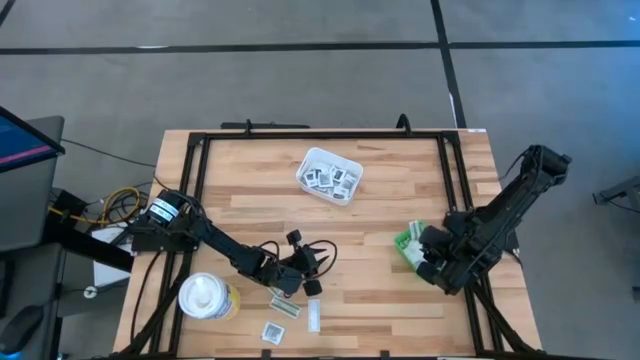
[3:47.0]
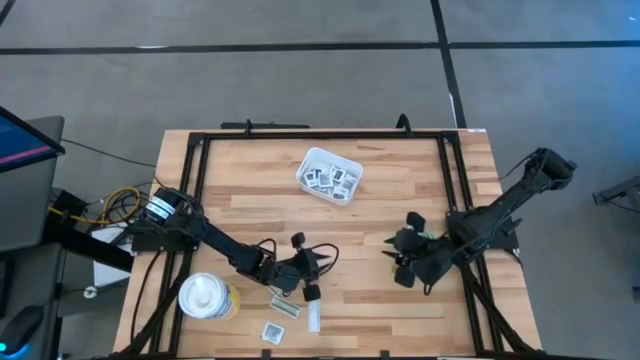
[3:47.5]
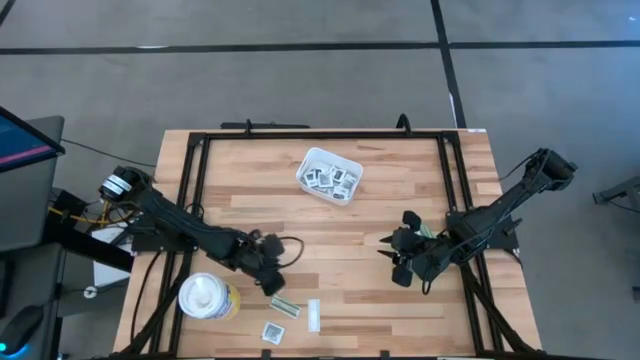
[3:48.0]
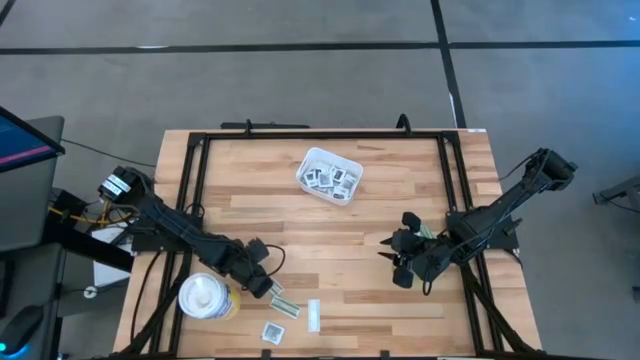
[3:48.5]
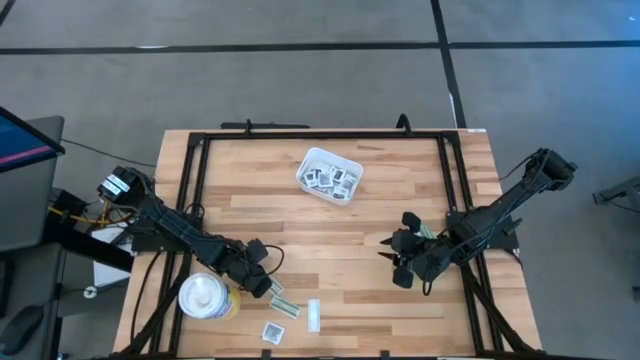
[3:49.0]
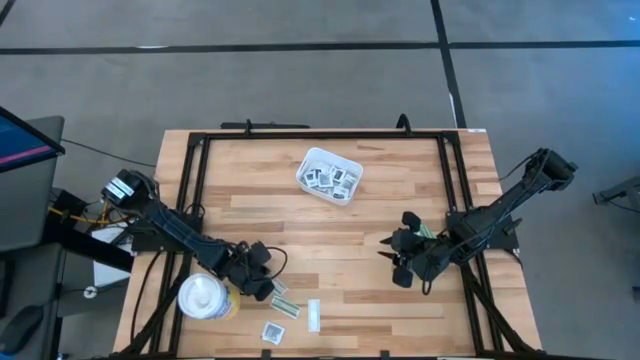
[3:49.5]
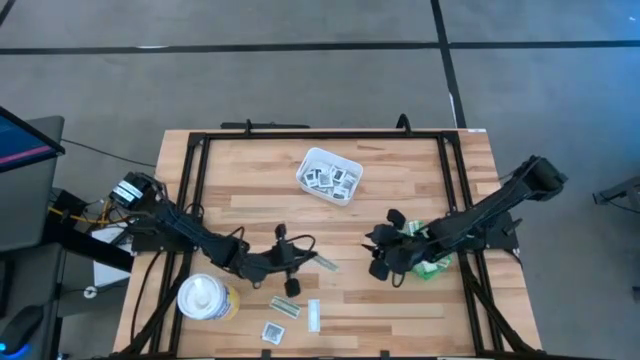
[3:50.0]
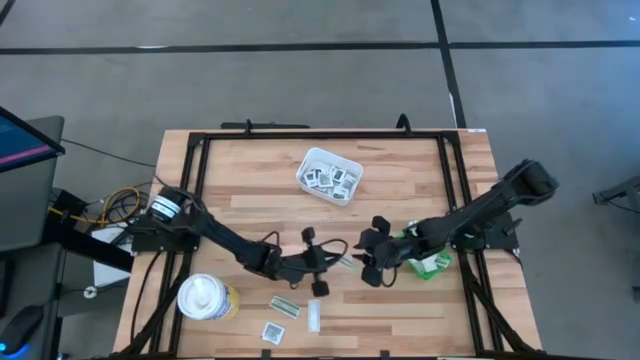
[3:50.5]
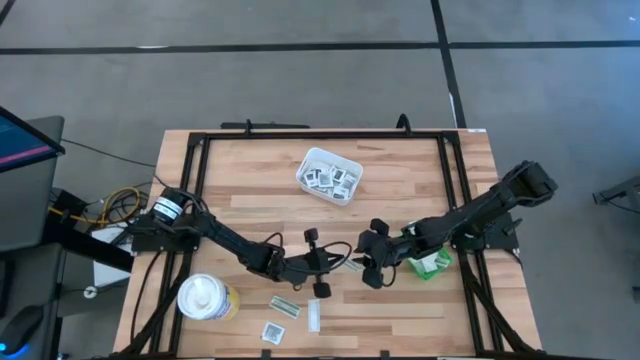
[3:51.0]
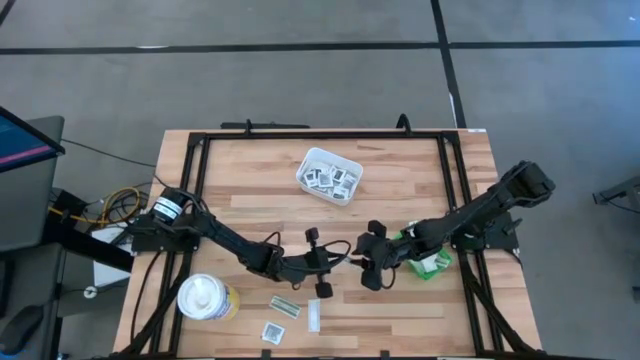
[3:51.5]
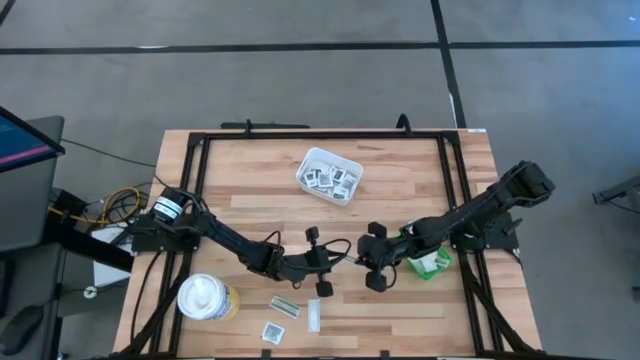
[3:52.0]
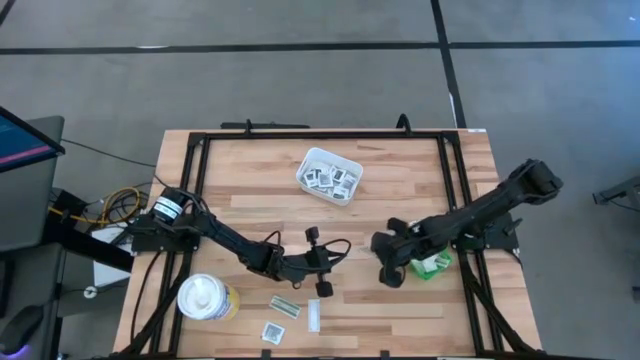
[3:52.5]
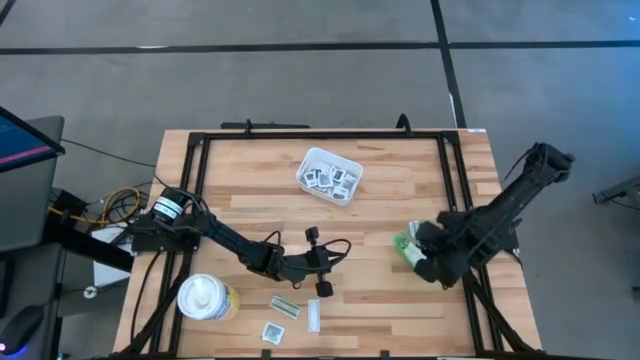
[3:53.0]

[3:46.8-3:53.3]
Task: Pick & Place First Aid Supplies
Put the bandage pack into the green bin

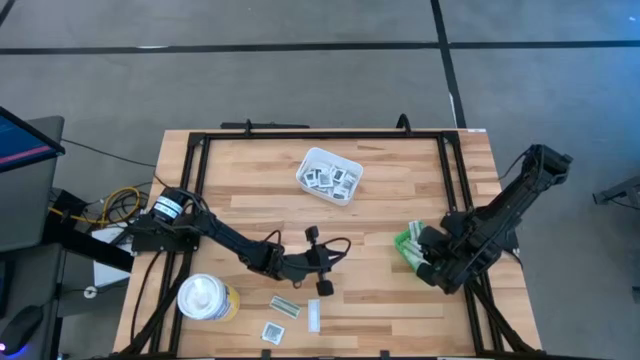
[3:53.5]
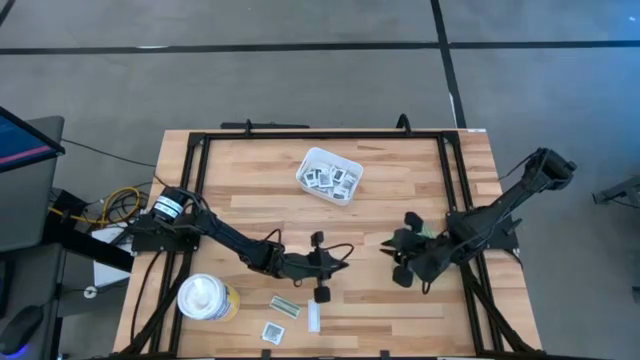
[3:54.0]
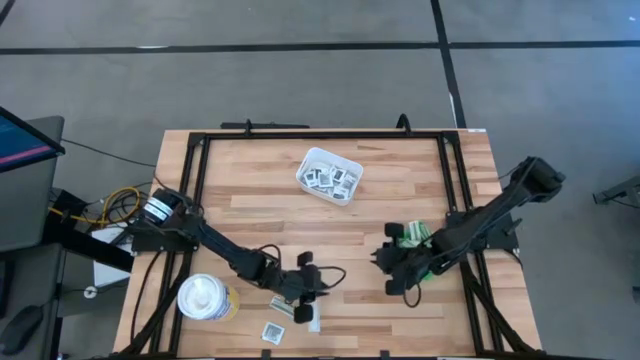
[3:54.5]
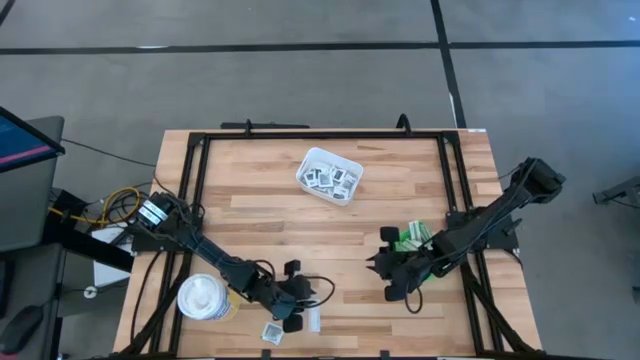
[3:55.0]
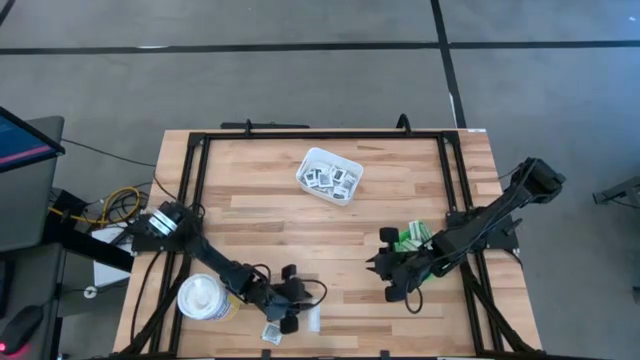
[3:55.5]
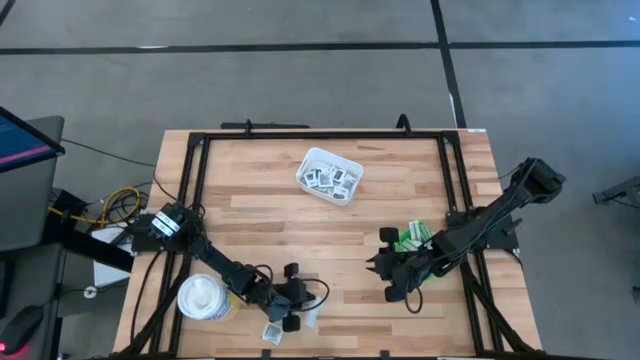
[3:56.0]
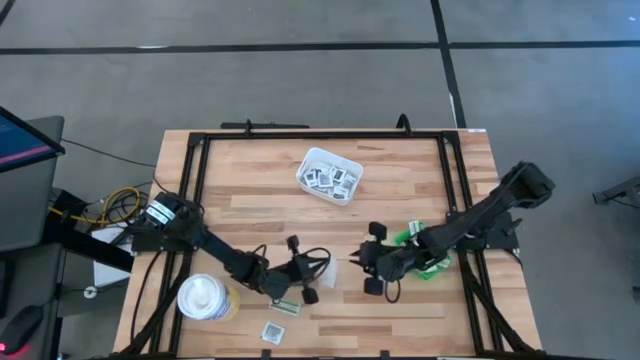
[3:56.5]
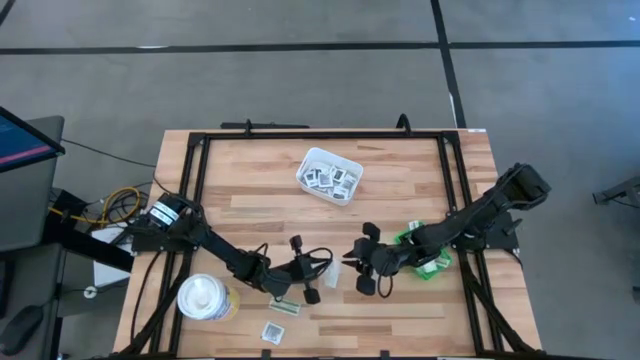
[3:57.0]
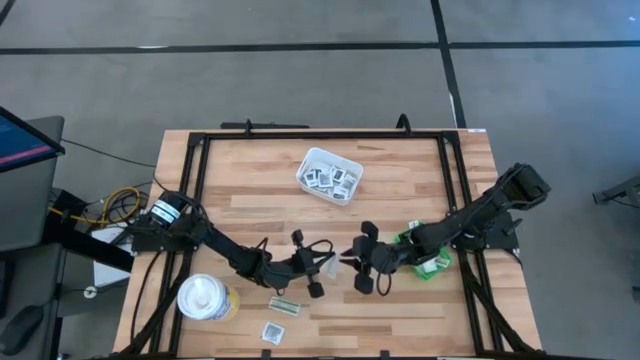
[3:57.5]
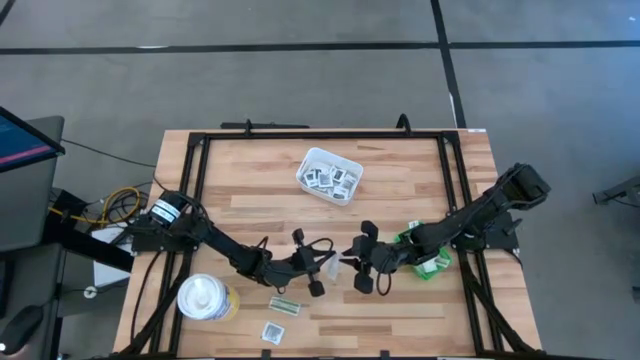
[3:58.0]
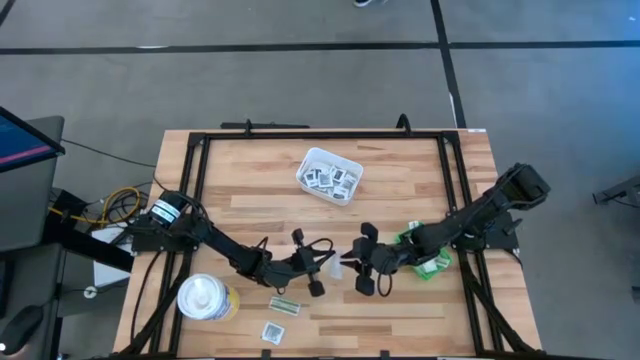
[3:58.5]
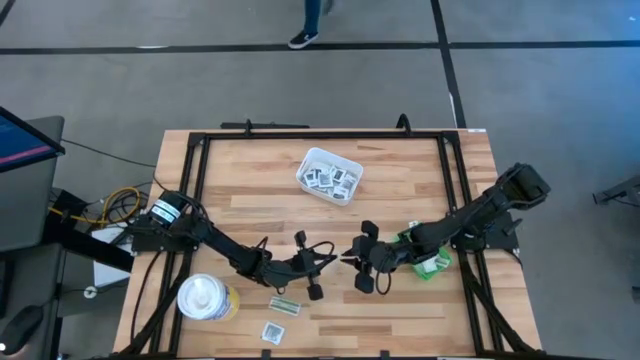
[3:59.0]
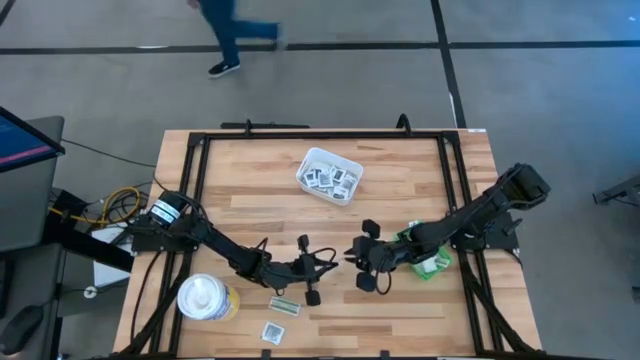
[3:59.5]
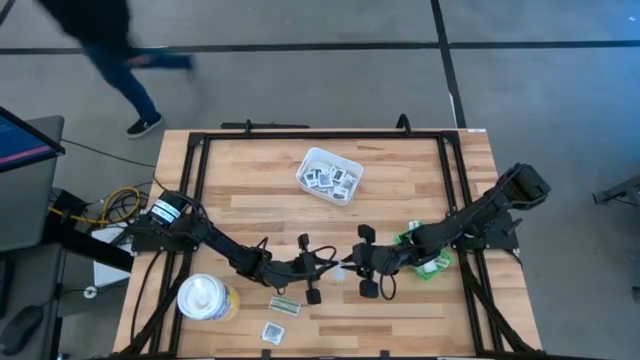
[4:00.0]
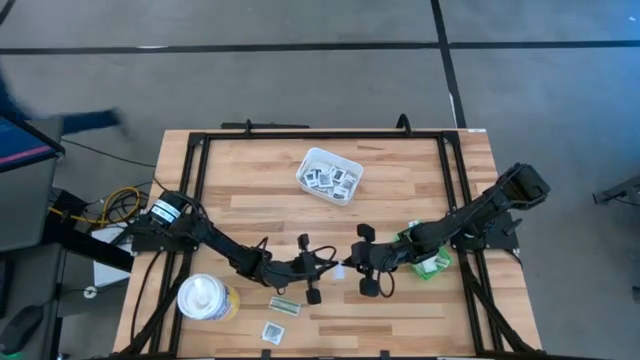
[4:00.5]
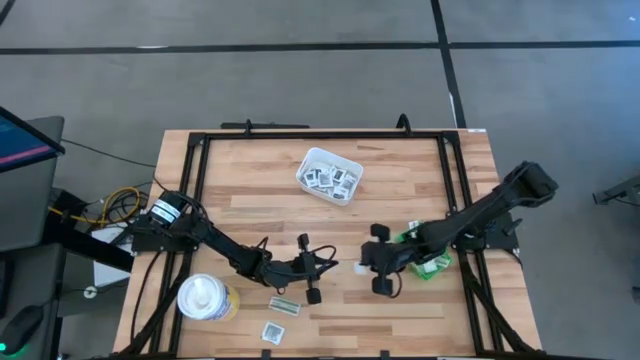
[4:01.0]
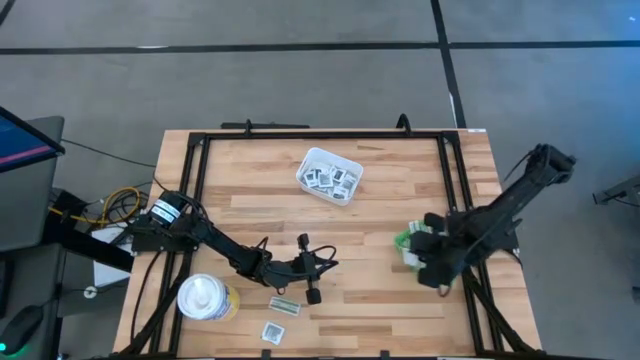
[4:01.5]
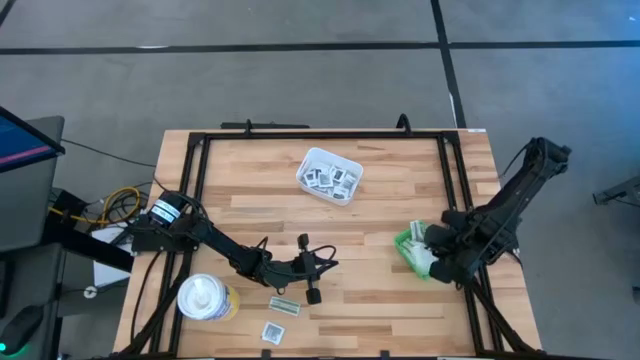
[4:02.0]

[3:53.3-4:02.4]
Put the bandage pack into the green bin

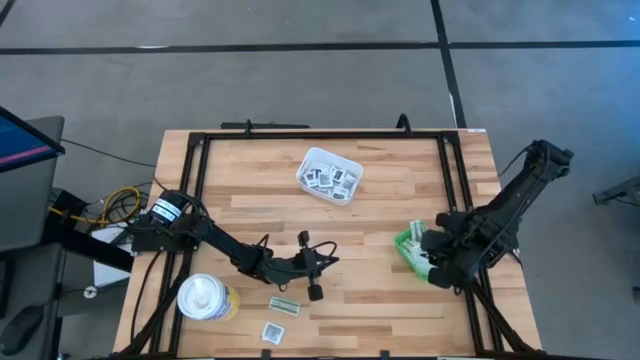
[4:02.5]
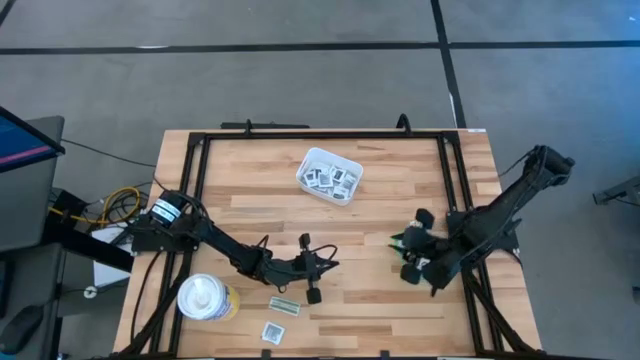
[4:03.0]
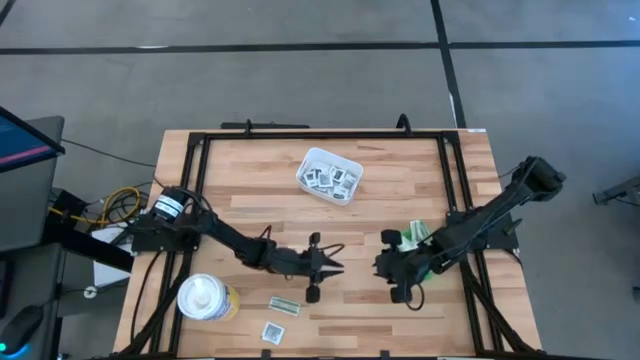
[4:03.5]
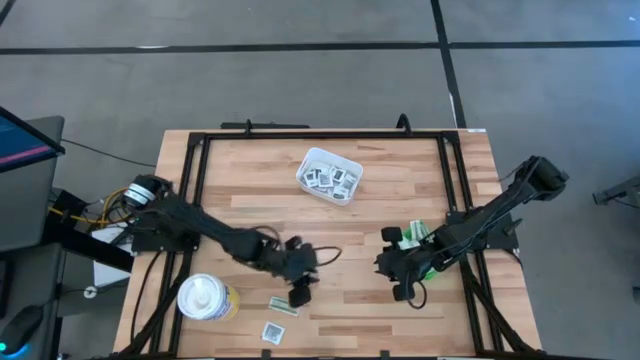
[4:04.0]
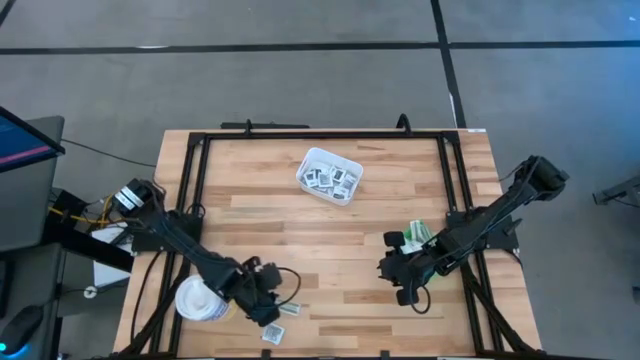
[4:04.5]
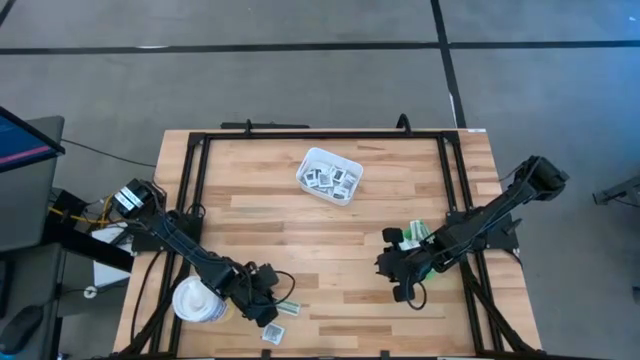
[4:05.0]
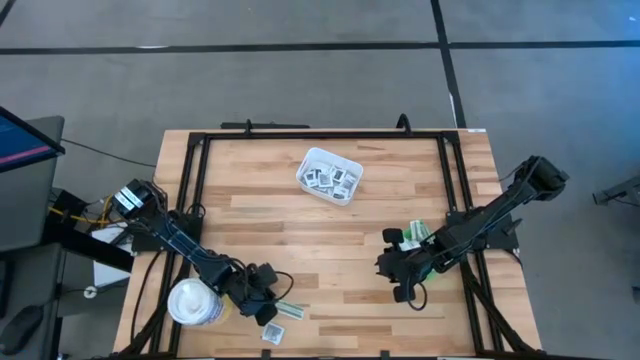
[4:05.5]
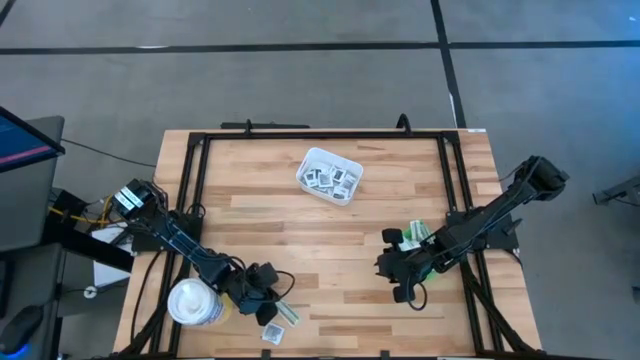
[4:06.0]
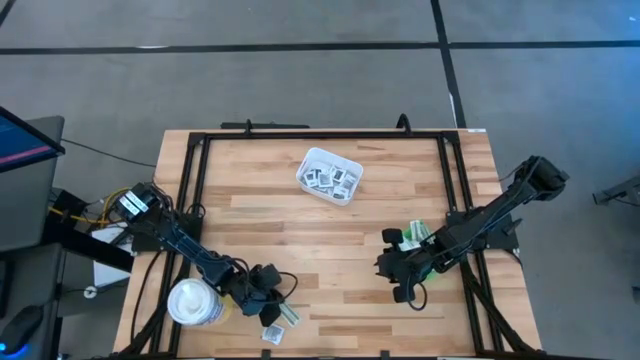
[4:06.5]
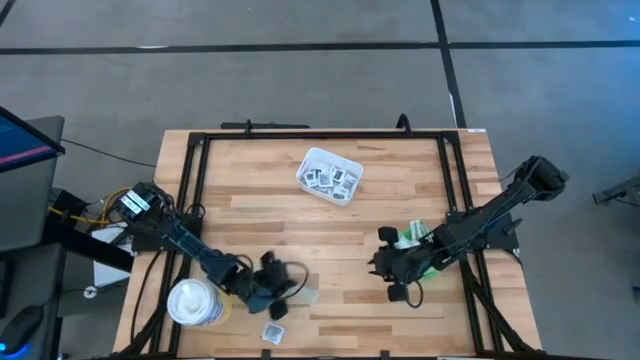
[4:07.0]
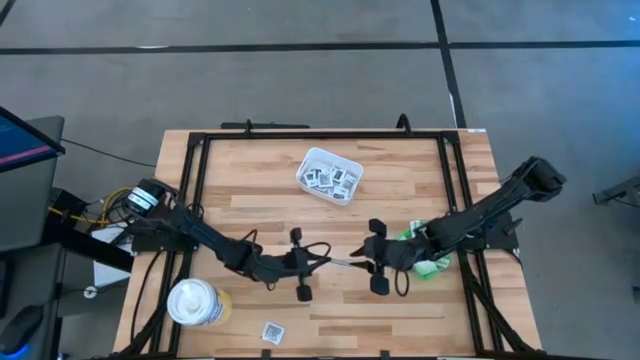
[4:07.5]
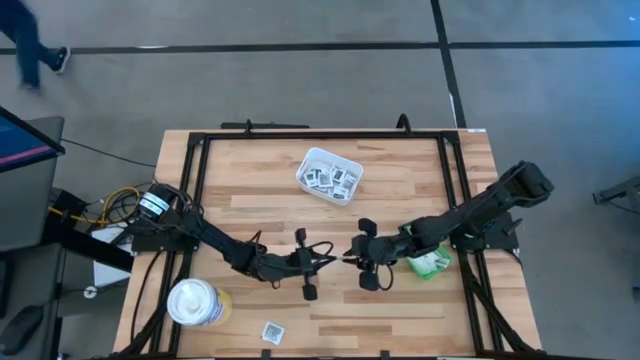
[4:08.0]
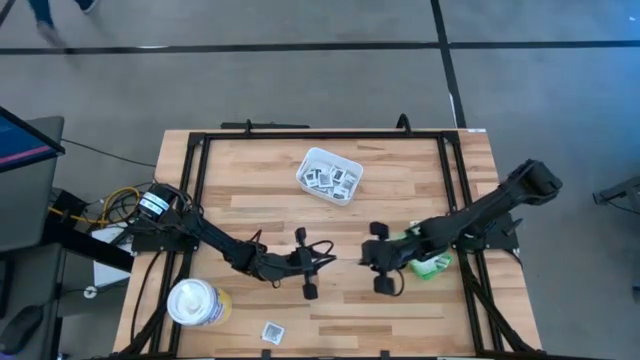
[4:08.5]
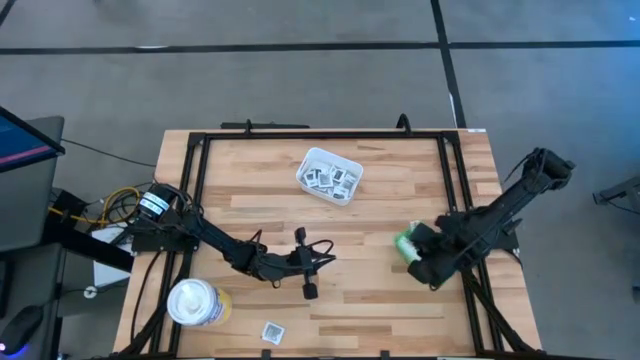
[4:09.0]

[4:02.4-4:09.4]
Put the bandage pack into the green bin
